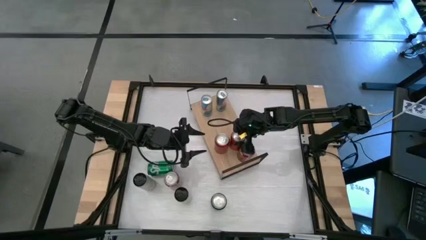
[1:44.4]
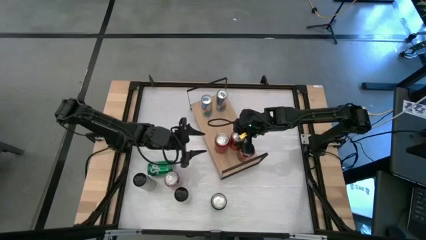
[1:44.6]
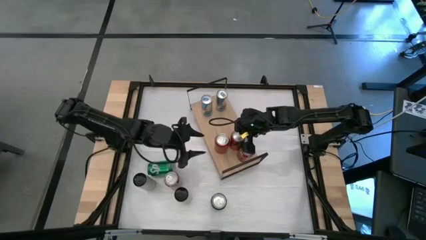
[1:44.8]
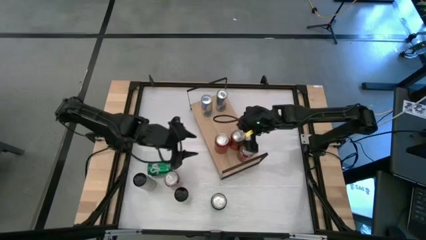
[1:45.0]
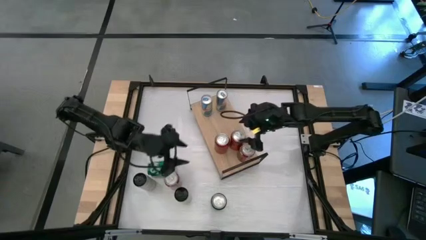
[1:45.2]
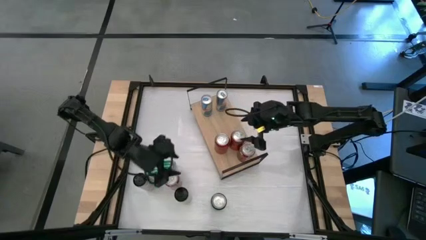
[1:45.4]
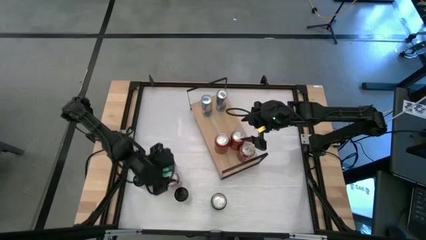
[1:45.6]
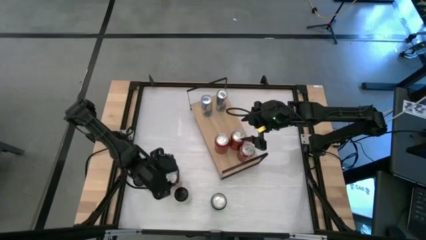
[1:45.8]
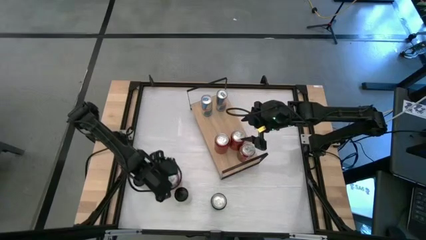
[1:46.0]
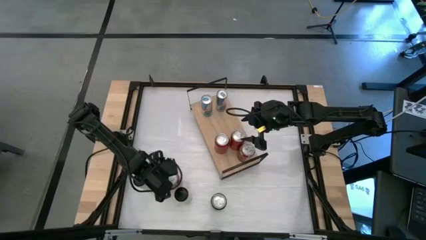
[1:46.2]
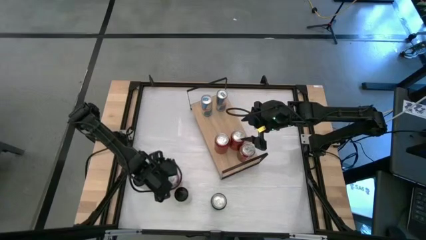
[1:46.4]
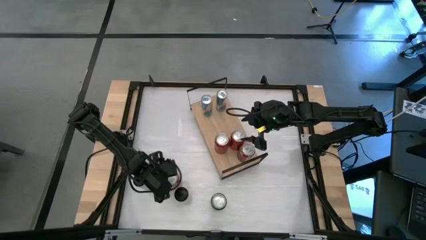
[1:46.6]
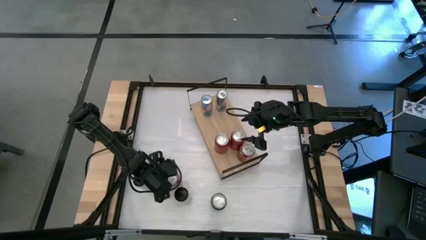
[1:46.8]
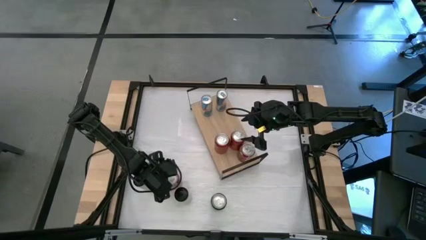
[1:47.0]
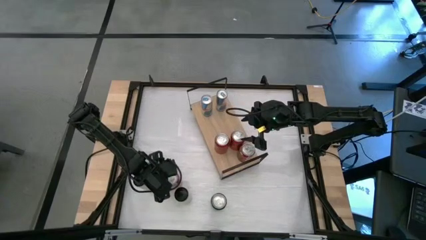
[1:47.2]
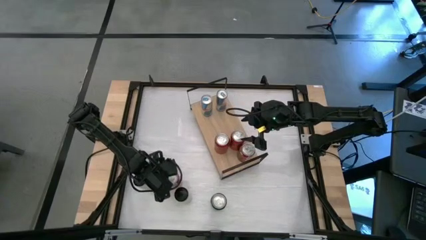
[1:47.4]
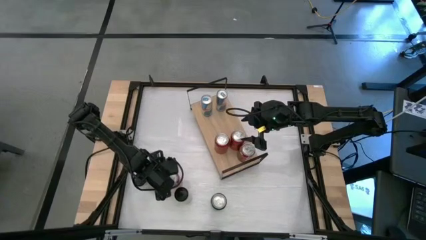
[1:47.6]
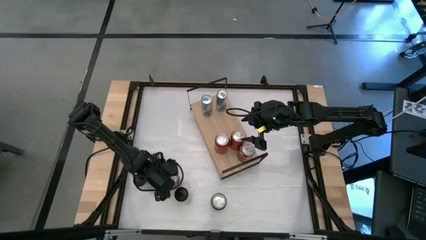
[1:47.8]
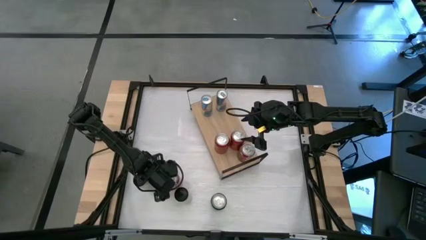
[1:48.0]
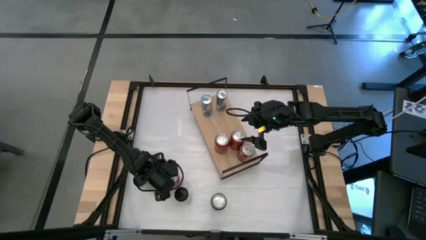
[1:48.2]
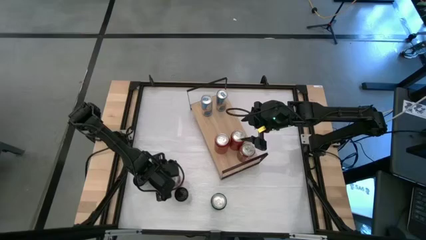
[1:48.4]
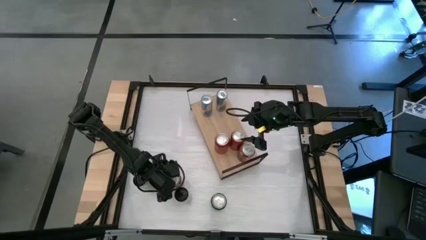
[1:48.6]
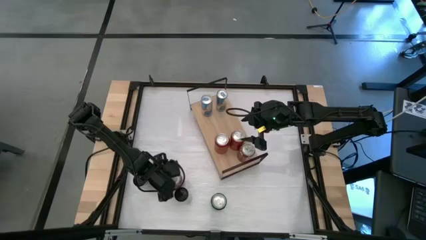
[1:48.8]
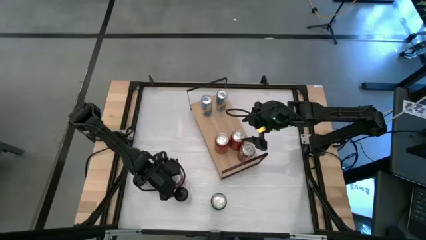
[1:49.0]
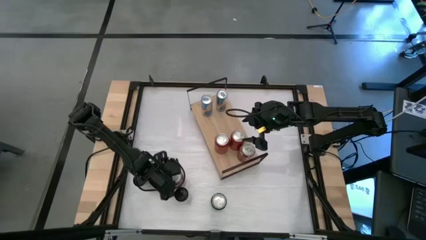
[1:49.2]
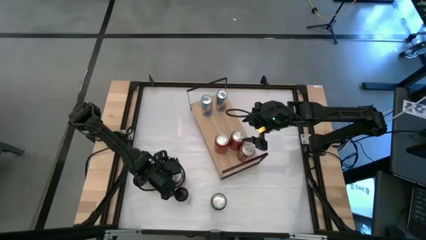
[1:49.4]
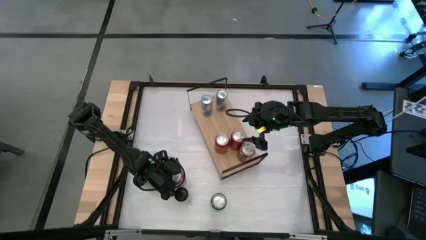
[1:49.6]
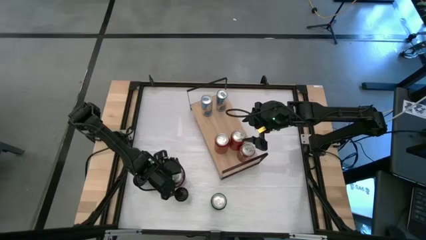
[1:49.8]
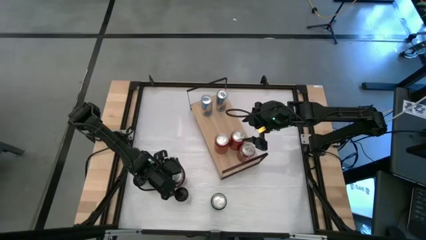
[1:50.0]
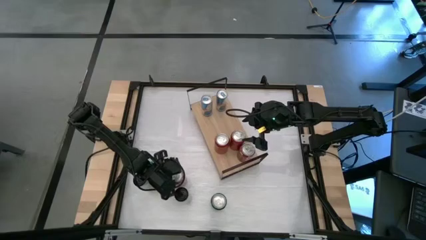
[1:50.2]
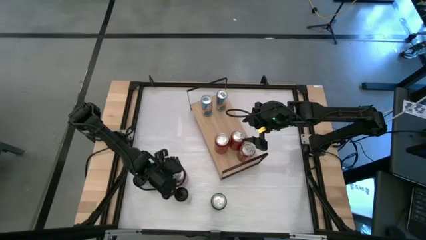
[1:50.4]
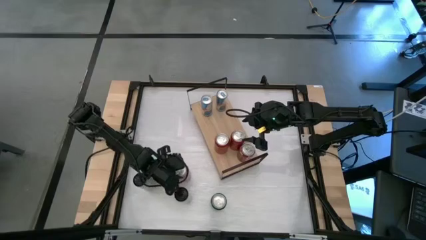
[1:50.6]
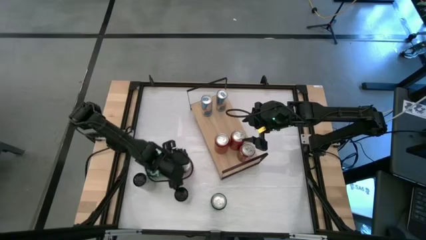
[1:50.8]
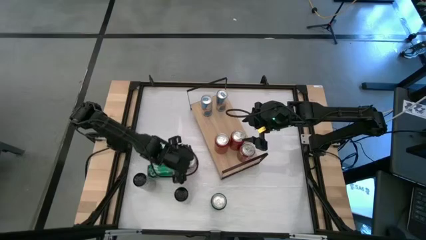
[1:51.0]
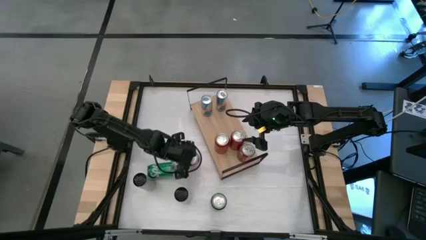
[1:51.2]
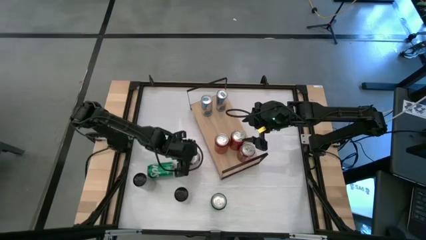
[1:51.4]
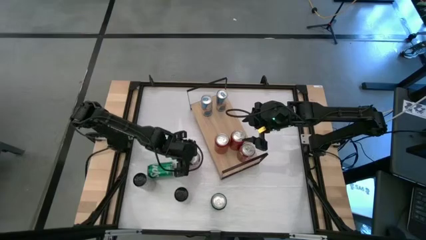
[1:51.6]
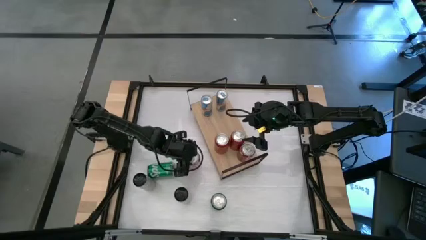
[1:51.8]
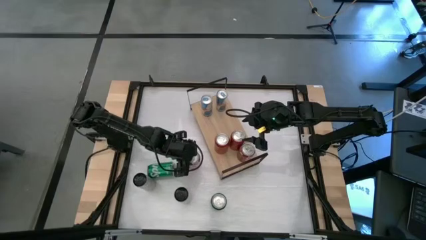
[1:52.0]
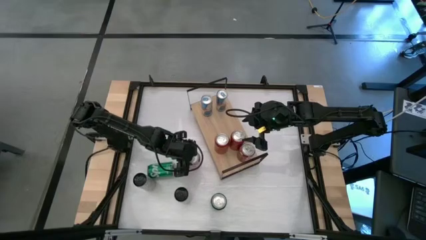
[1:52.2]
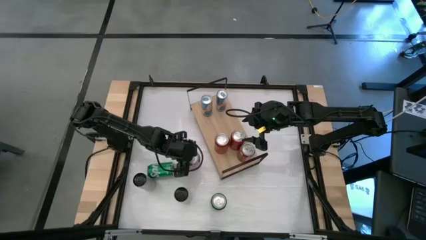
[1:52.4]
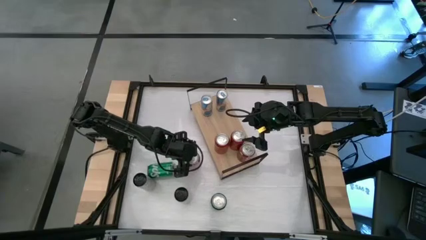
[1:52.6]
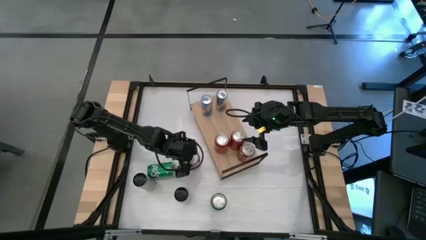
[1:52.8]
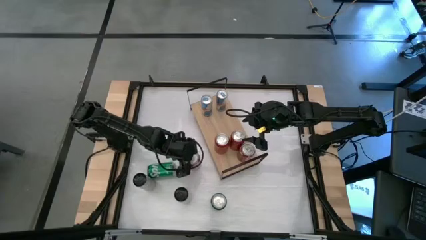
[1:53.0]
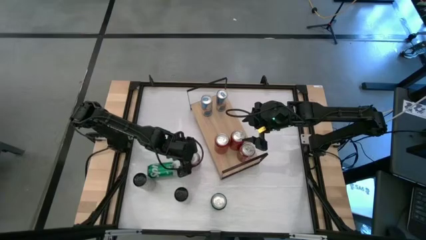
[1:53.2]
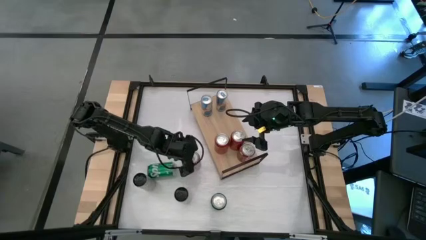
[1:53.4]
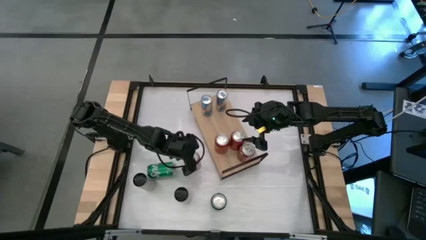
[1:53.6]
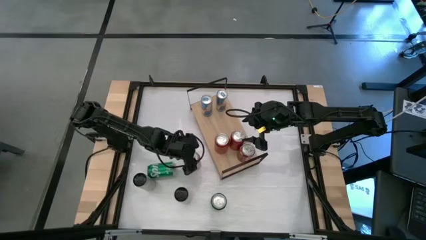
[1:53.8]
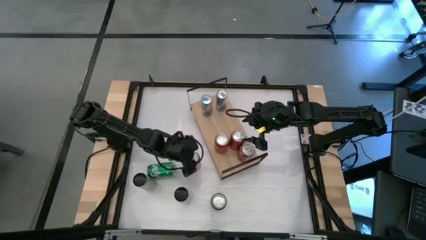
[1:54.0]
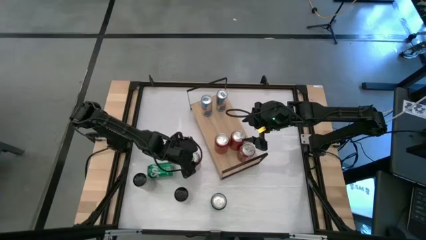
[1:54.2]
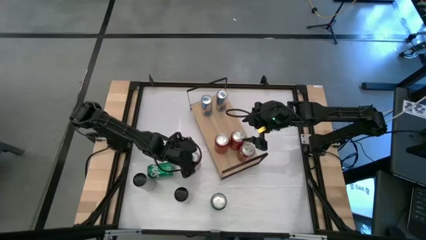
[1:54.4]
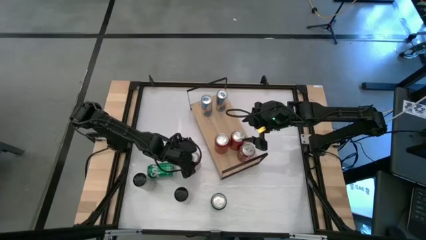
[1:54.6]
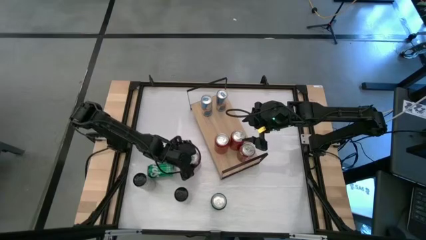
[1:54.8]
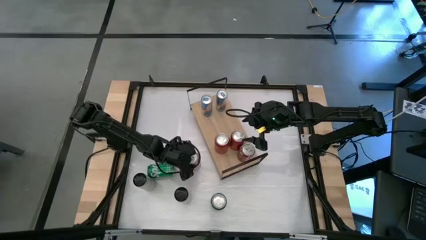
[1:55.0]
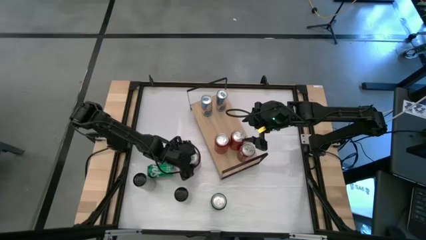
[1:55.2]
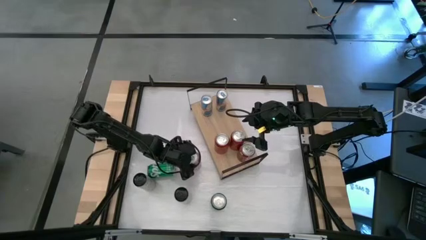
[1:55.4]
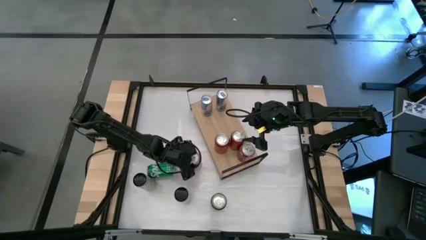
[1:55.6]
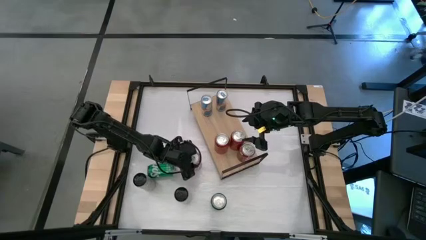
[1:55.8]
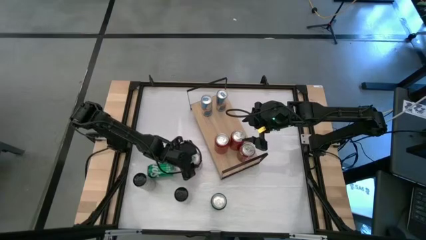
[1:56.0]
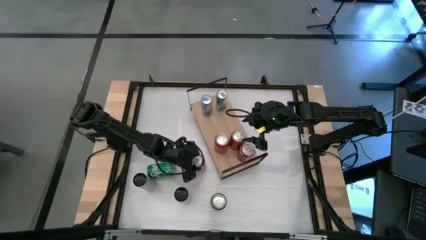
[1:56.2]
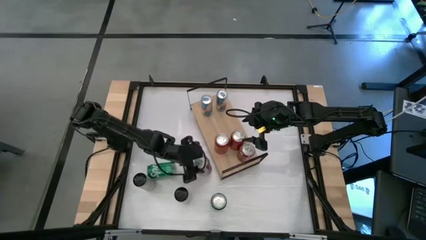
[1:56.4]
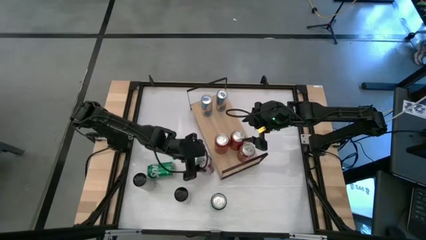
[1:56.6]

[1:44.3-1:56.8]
Task: Place canned beverage on shelf
Put the red-white soda can on the shelf aligned with the other red-white soda can

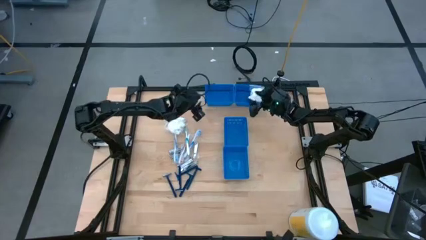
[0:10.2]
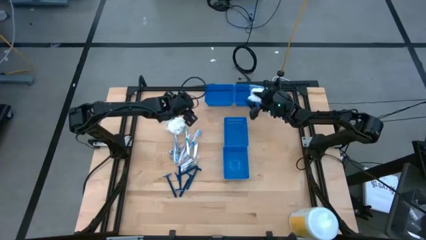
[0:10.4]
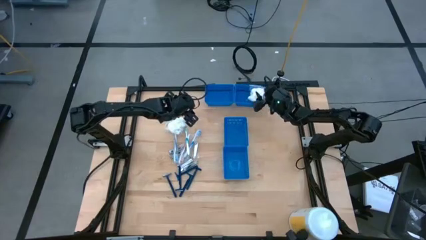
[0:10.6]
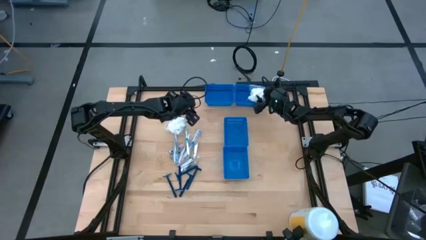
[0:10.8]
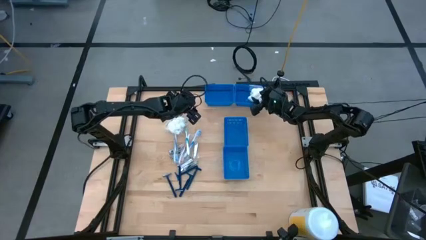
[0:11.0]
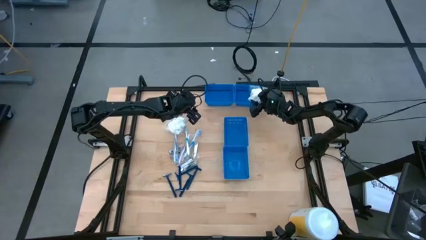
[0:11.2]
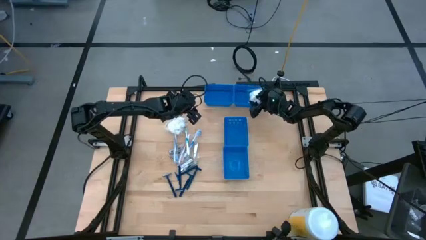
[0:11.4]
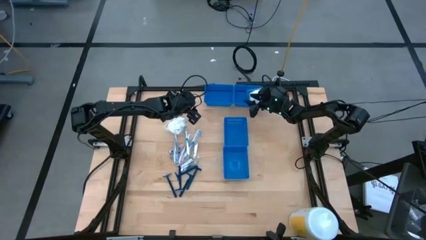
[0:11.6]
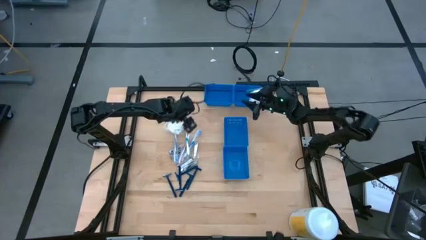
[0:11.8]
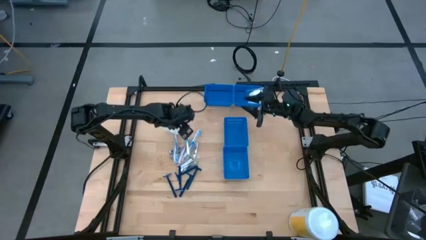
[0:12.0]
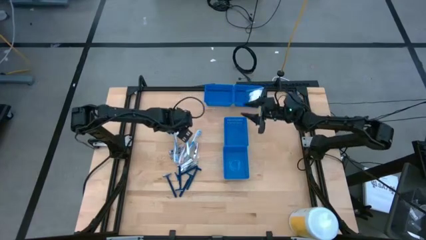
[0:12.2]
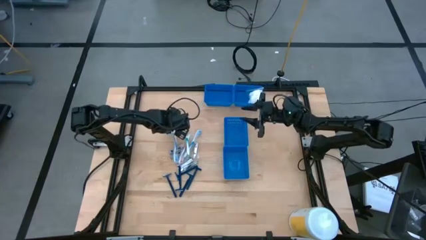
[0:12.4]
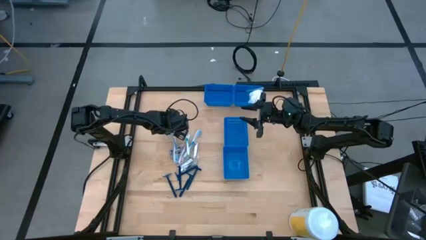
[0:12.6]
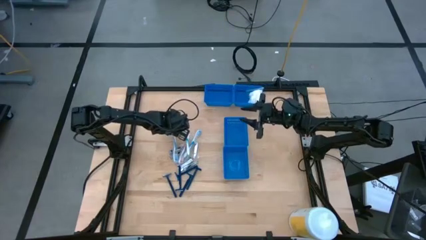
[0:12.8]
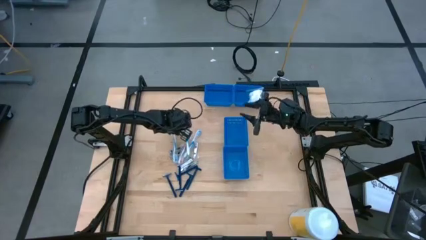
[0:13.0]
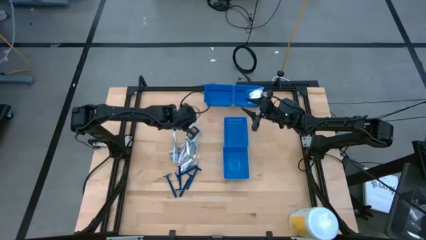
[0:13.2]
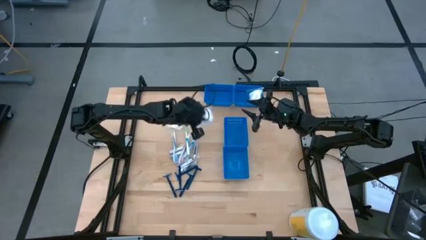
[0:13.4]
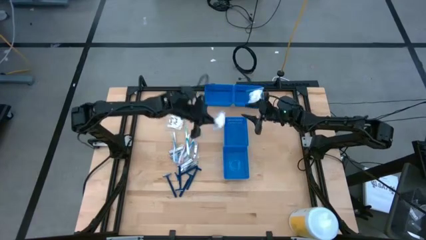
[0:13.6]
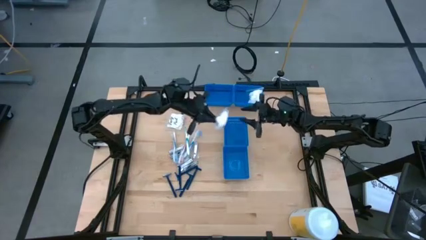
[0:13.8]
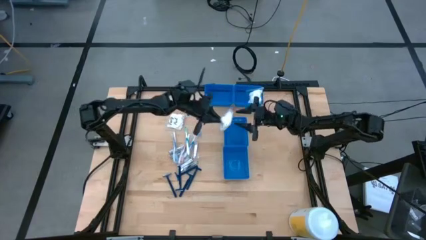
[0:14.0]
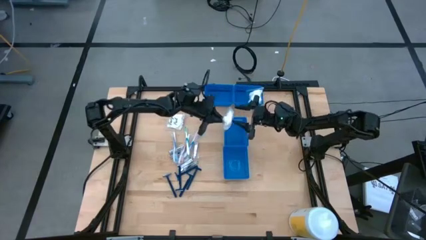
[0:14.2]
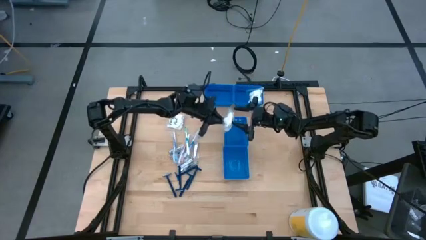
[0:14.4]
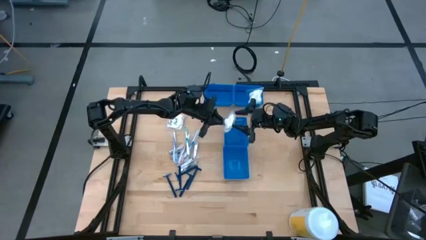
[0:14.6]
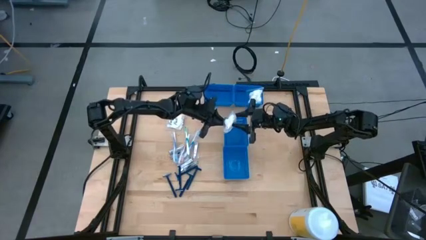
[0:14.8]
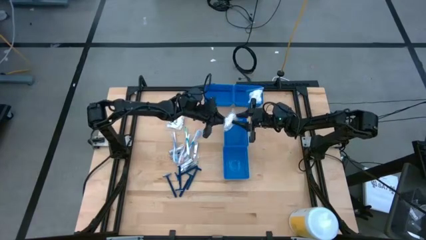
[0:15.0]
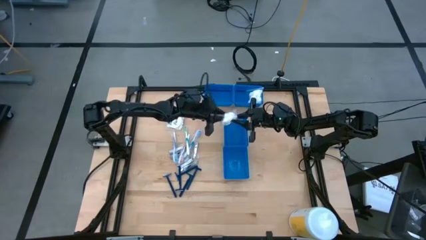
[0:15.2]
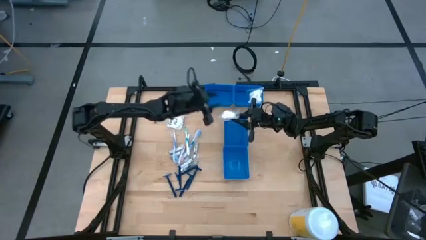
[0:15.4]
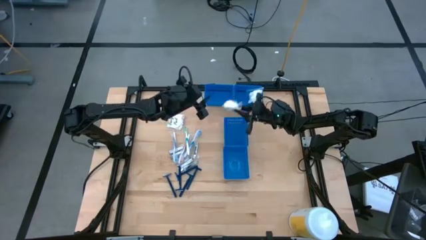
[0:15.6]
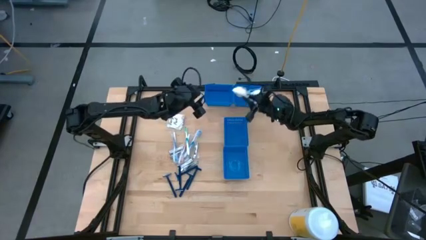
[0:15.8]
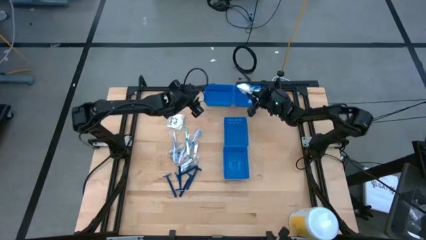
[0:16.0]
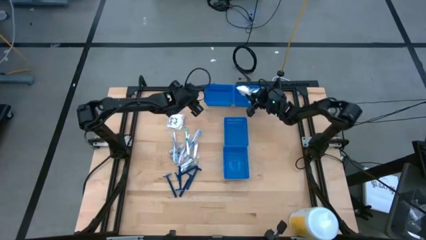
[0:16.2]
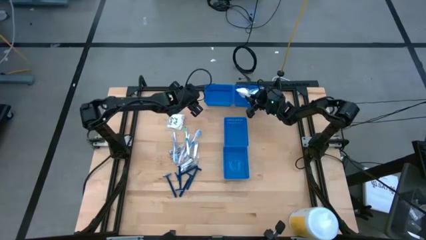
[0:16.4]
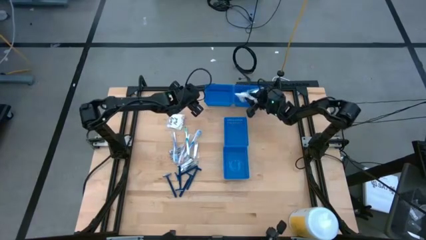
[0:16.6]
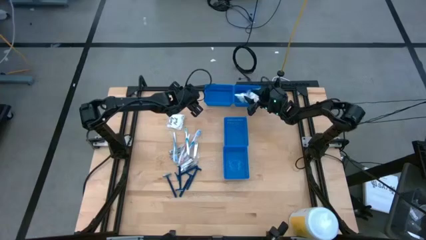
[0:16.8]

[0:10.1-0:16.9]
Task: Pick & Place Travel size toiletries
Put the cotton balls in the top right blue bin
